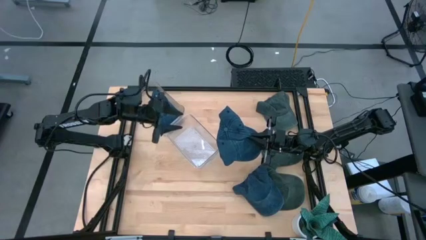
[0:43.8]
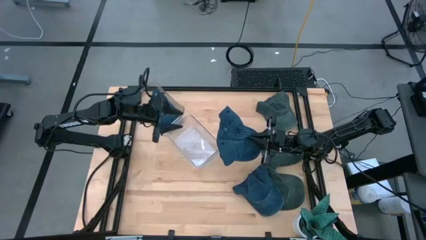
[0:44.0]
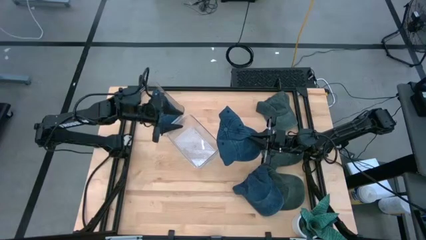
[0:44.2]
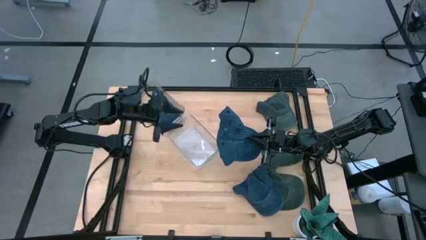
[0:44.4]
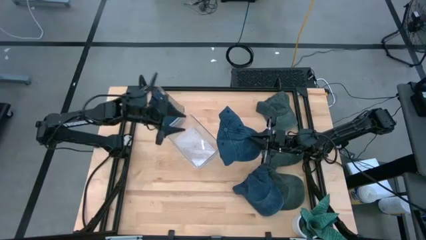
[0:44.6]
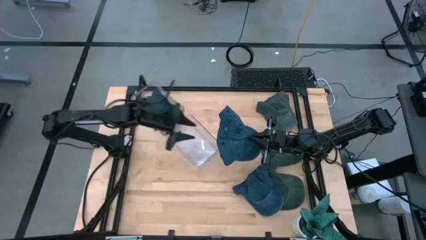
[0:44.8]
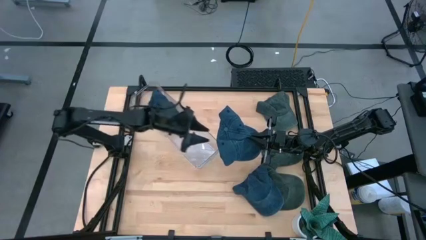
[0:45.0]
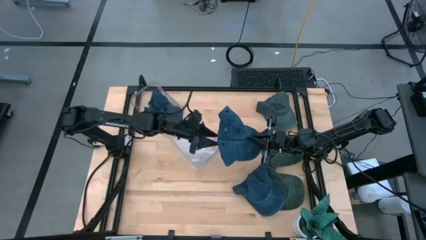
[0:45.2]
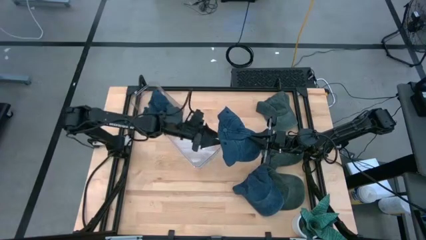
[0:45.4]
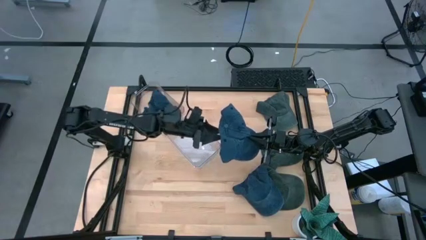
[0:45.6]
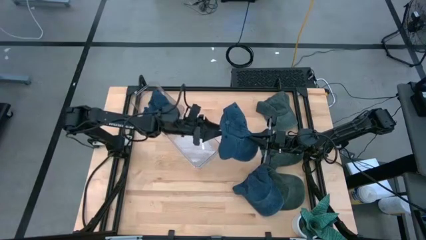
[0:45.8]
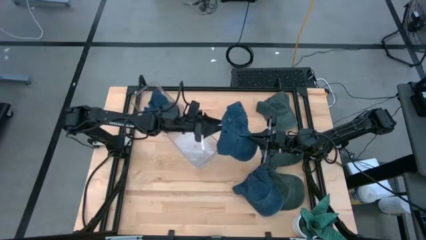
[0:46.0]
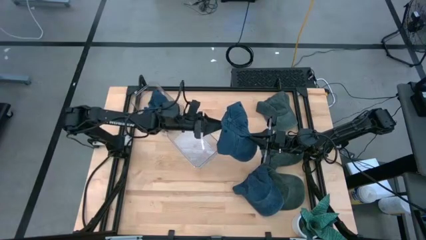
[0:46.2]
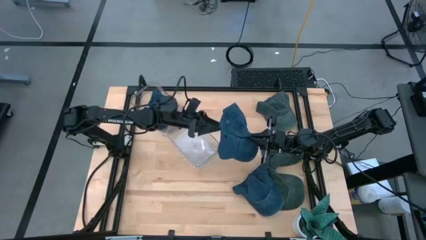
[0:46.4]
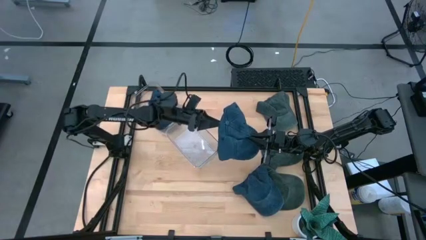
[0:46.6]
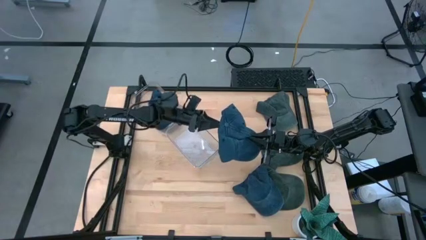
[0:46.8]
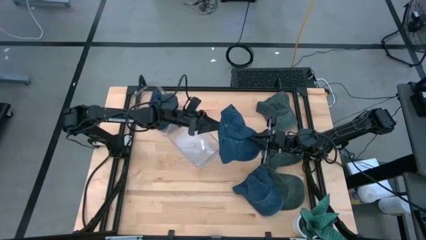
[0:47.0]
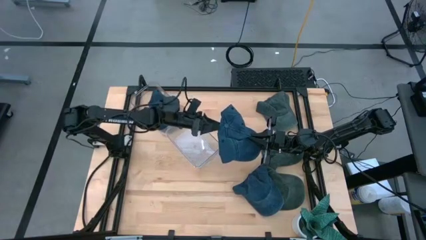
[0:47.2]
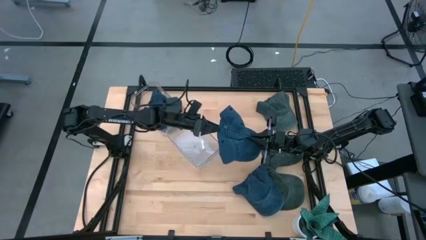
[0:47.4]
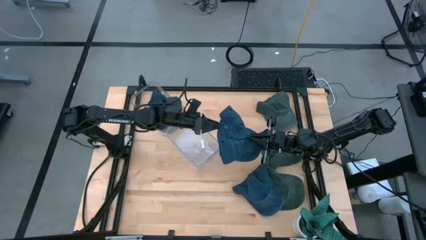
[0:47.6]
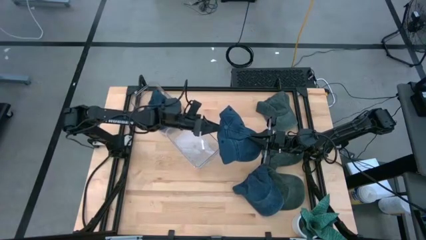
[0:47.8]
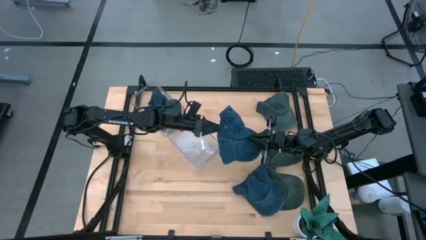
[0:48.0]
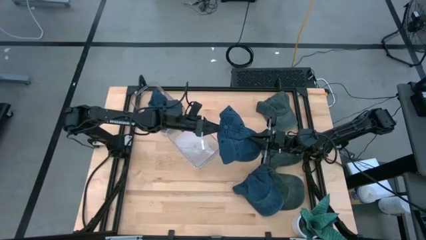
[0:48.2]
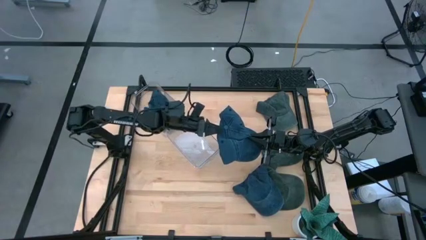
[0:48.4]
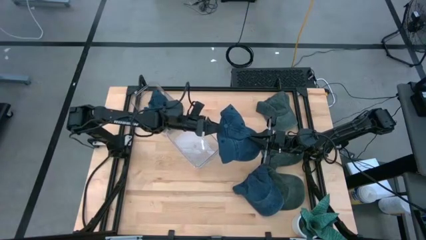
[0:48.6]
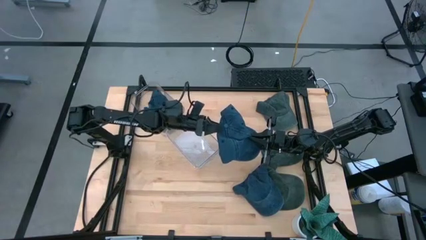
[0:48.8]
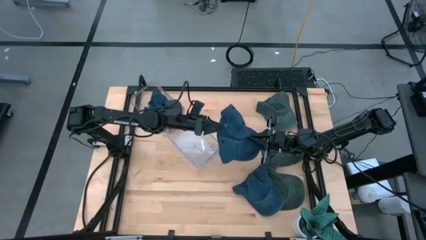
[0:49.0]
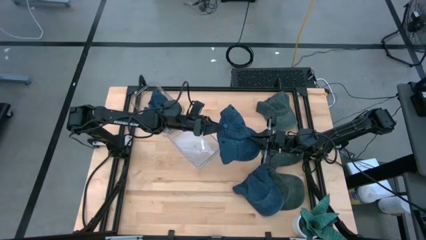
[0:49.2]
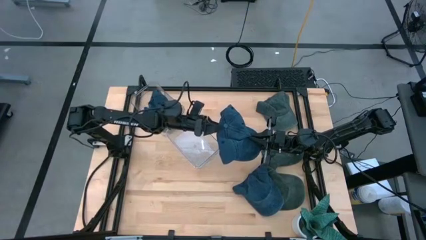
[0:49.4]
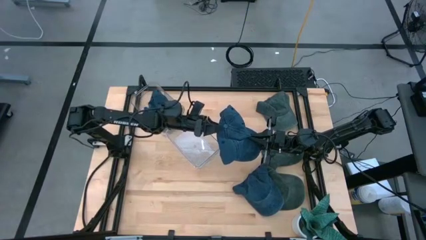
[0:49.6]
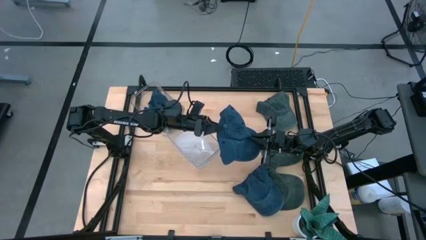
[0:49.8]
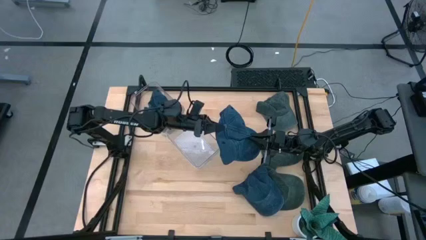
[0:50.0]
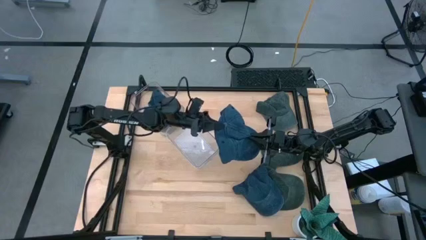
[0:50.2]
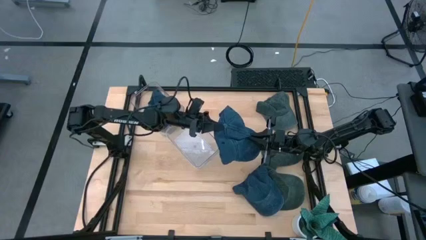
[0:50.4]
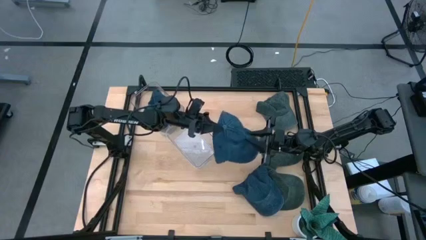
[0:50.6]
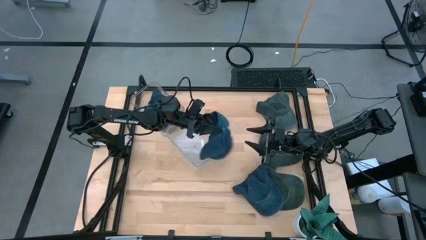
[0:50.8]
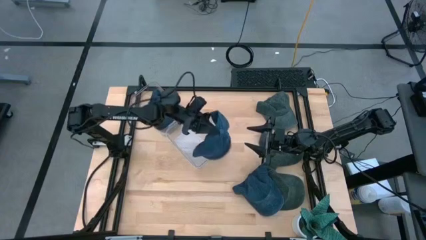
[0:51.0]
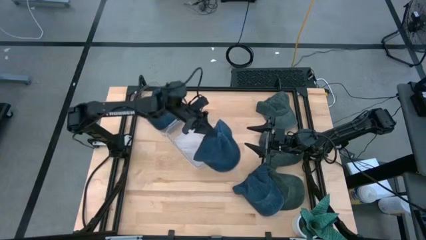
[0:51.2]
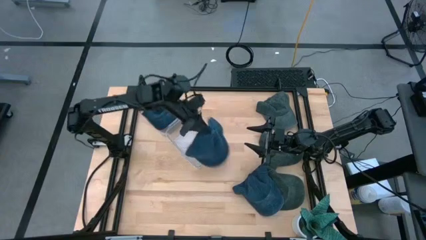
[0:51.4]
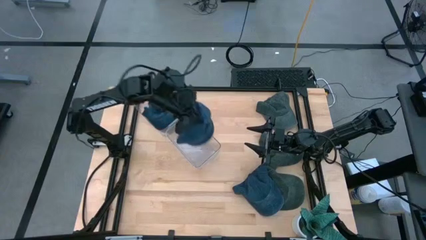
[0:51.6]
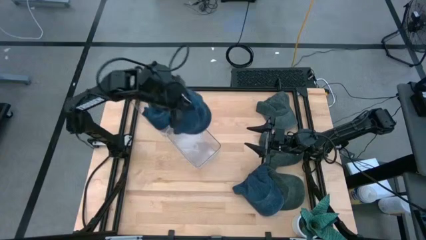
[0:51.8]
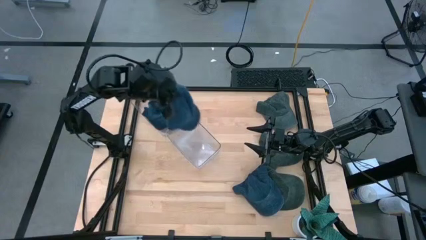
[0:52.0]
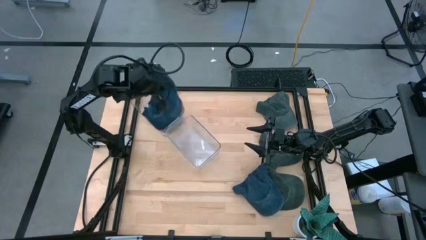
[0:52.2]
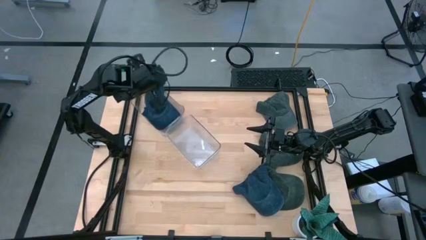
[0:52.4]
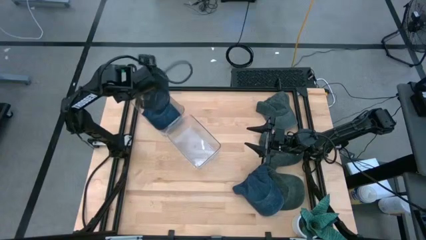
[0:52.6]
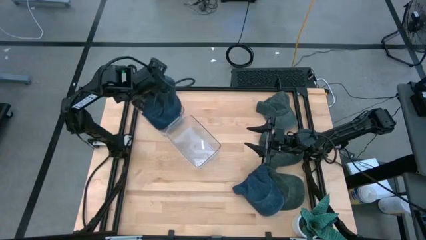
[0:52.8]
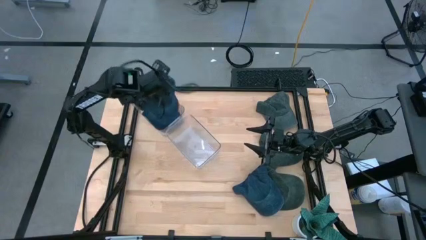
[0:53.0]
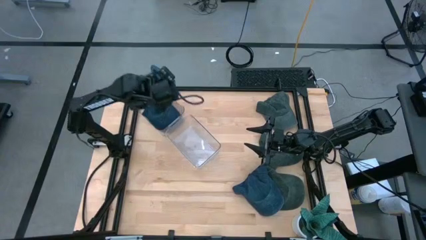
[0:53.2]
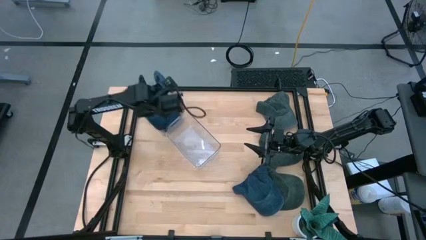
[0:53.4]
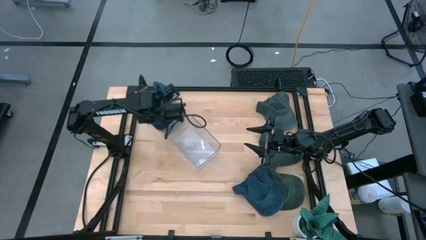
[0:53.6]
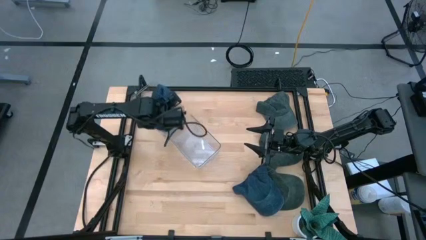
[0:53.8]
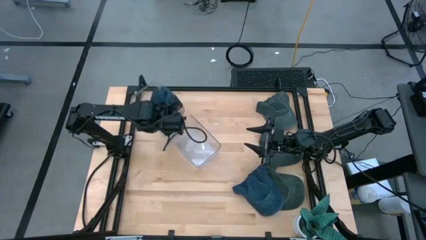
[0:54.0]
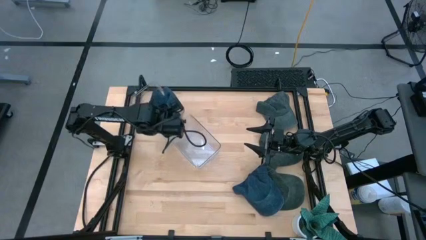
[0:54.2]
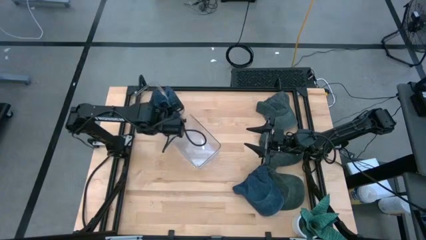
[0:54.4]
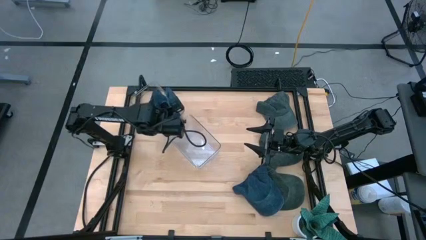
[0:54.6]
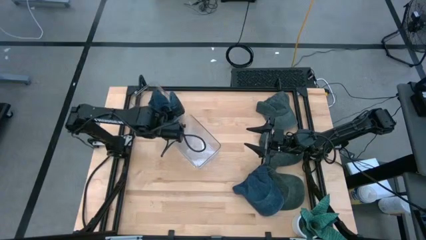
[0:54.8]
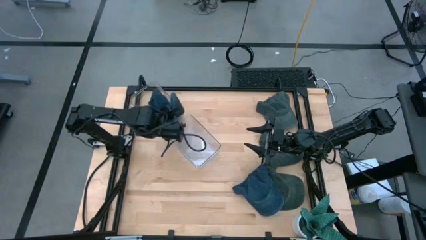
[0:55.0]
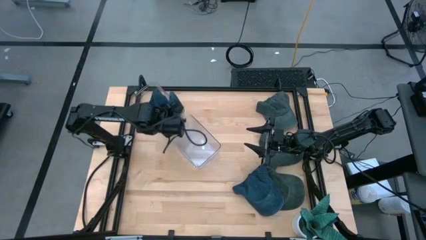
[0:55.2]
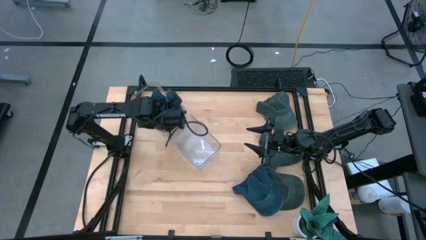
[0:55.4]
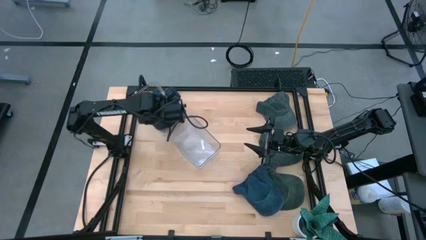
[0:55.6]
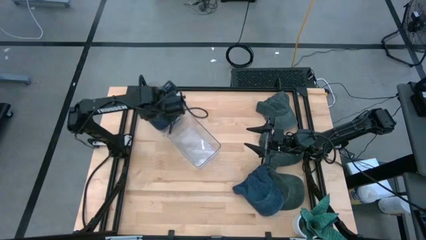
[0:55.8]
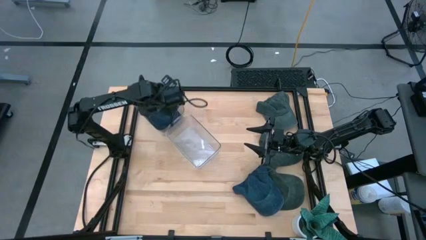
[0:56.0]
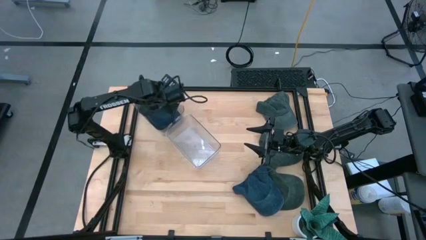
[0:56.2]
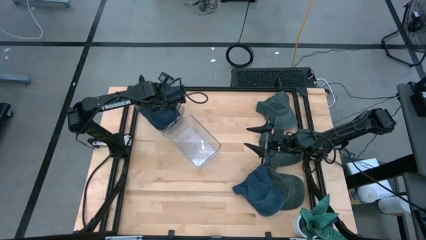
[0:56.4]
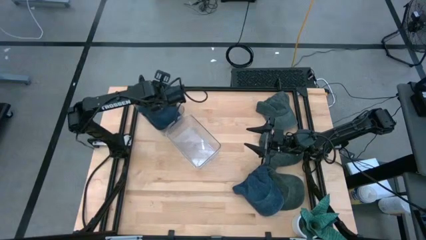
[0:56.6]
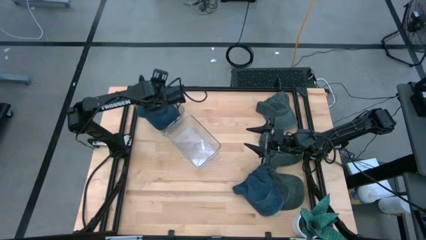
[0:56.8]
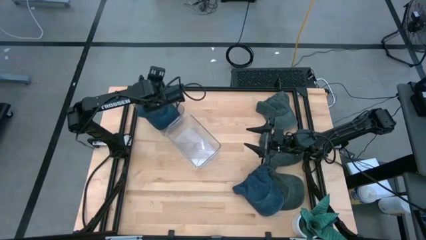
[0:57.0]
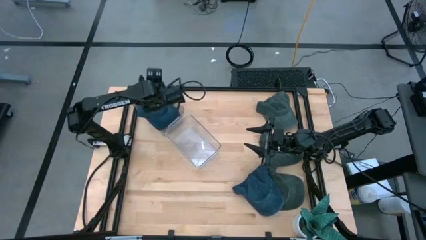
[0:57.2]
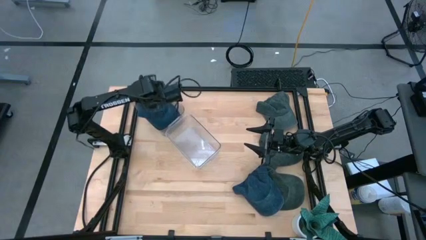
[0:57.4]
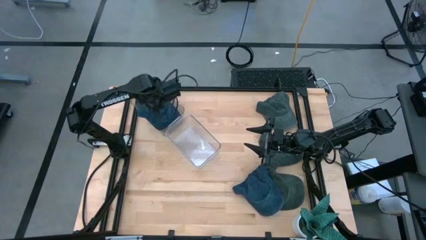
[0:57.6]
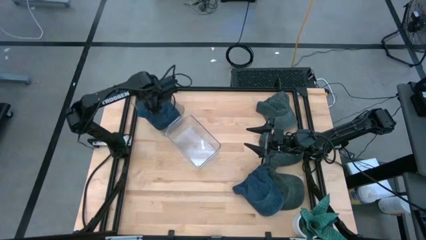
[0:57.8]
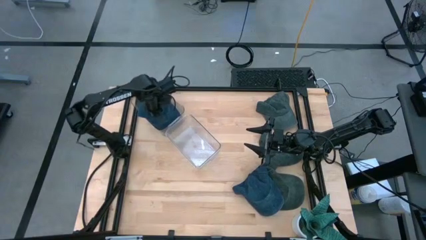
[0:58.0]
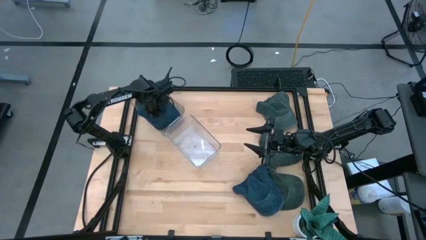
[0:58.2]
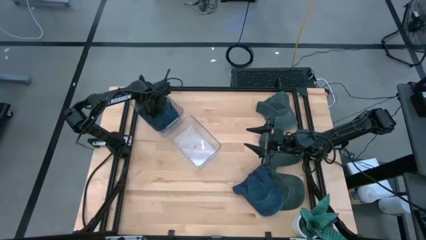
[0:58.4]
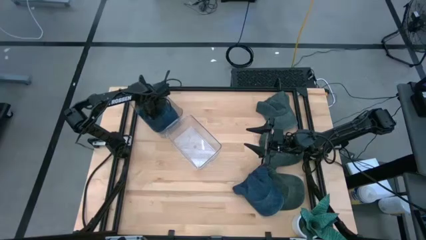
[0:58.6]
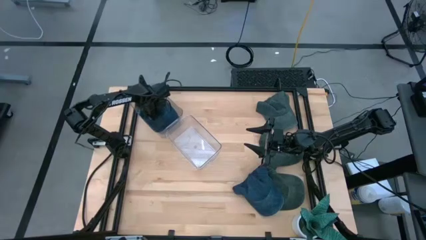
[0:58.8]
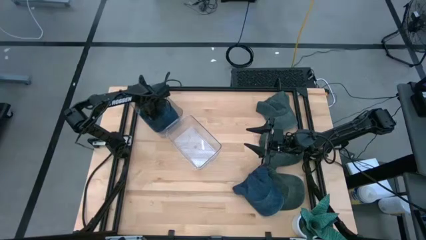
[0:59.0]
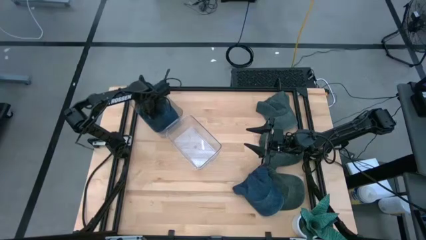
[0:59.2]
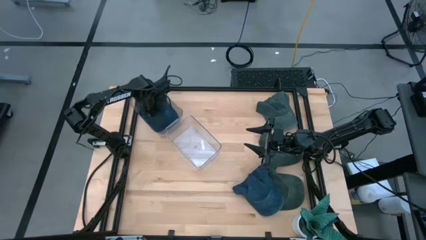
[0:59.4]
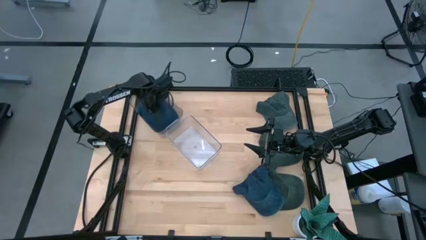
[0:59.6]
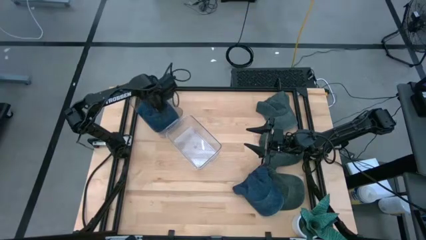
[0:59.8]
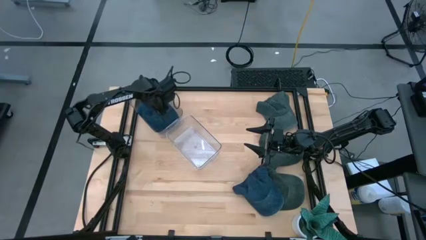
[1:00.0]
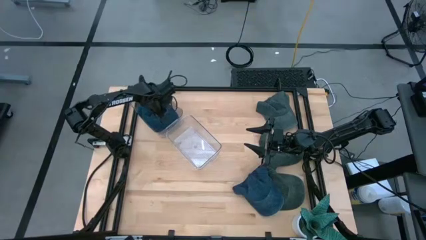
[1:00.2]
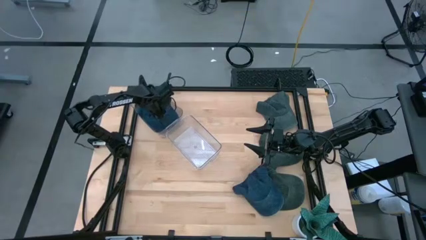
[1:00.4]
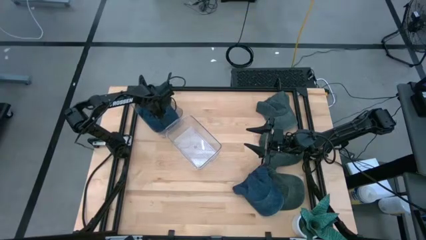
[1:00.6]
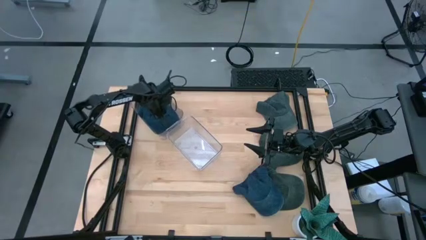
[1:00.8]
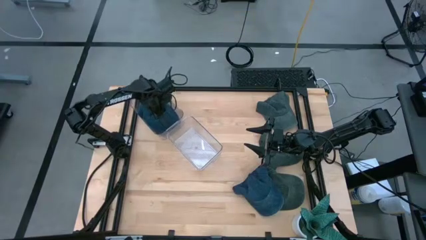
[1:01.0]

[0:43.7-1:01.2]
Task: Pick & Place hat
Put the top blue cap into the top transparent bin
